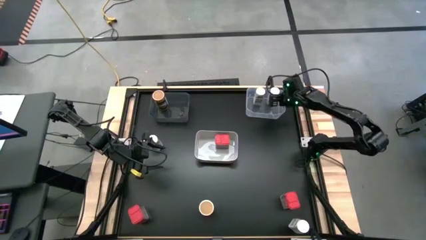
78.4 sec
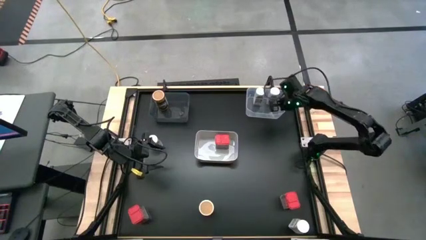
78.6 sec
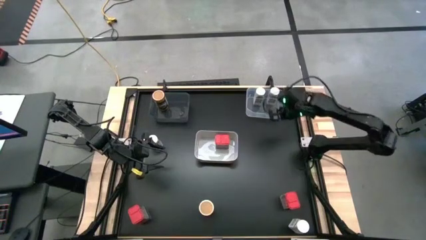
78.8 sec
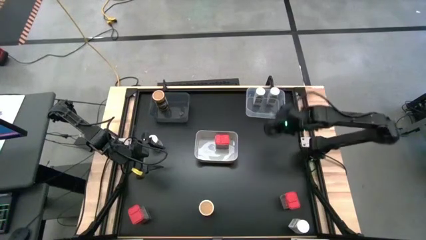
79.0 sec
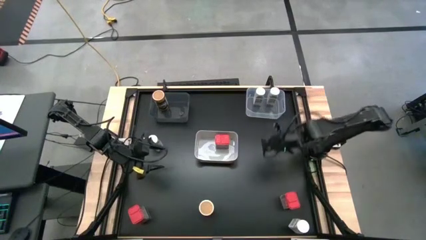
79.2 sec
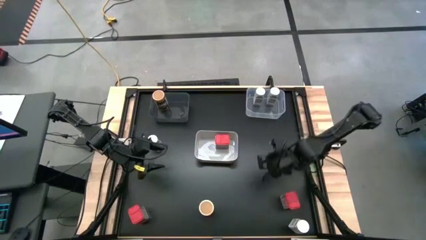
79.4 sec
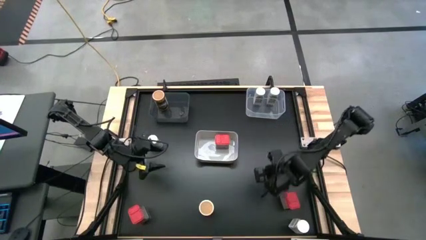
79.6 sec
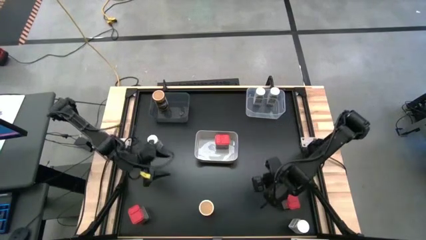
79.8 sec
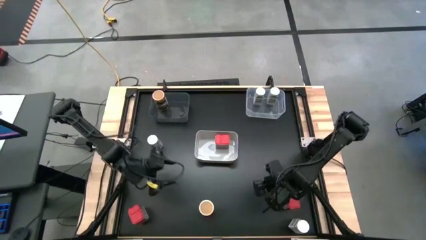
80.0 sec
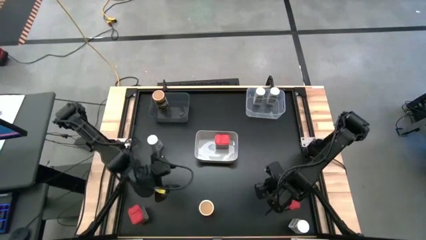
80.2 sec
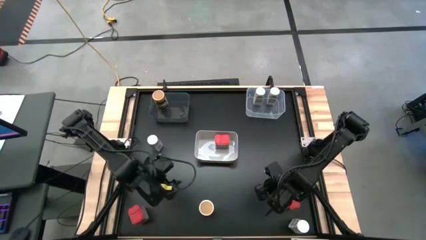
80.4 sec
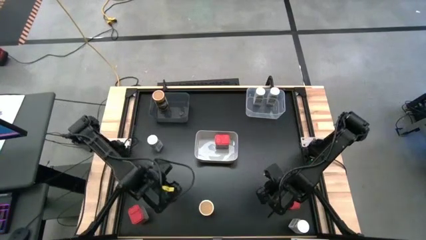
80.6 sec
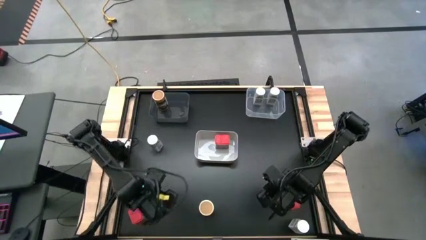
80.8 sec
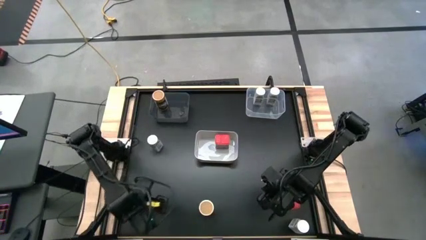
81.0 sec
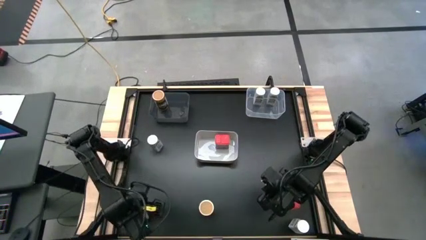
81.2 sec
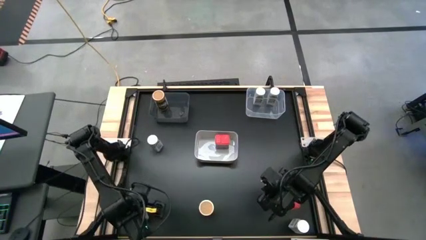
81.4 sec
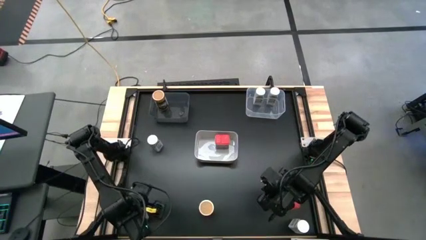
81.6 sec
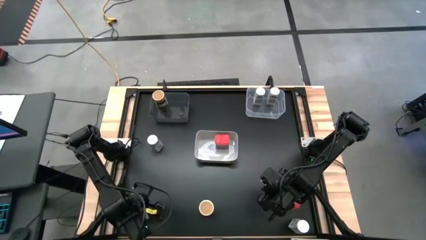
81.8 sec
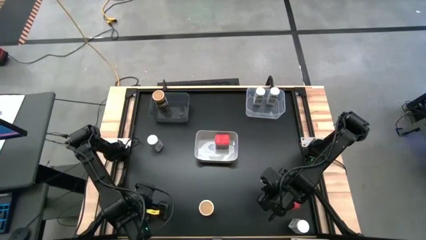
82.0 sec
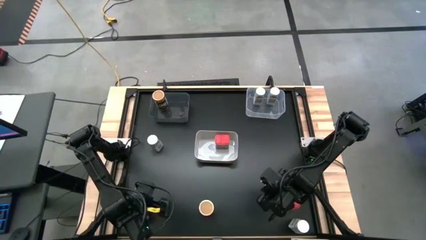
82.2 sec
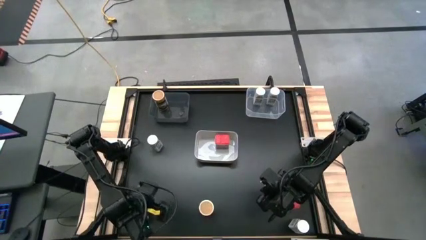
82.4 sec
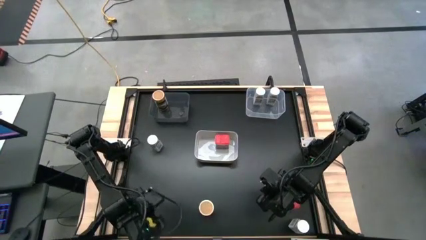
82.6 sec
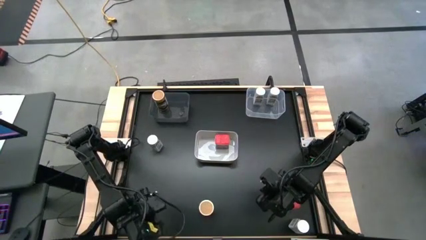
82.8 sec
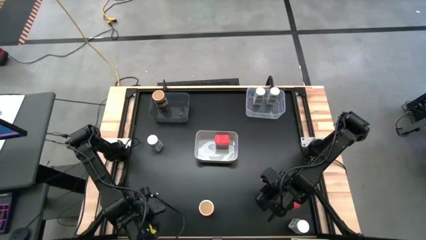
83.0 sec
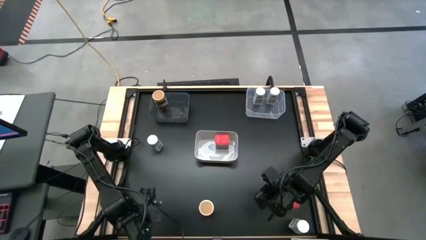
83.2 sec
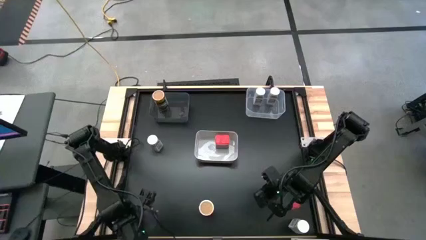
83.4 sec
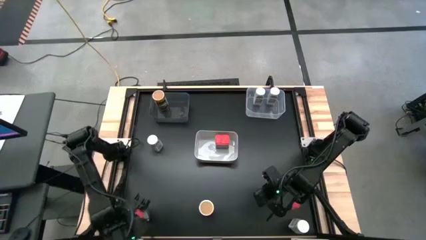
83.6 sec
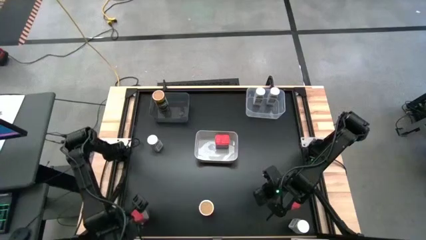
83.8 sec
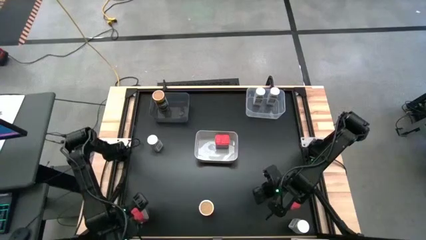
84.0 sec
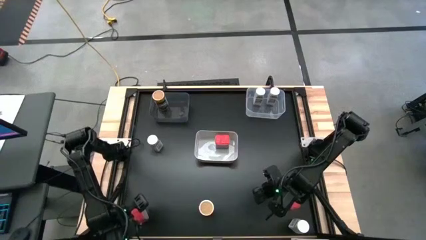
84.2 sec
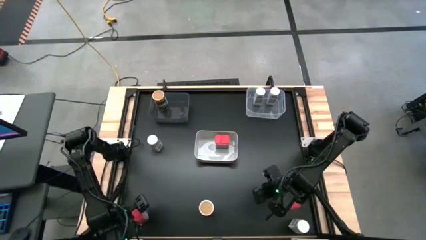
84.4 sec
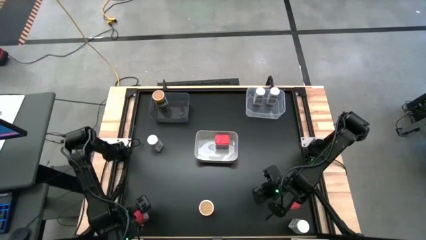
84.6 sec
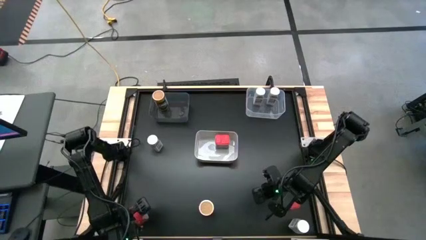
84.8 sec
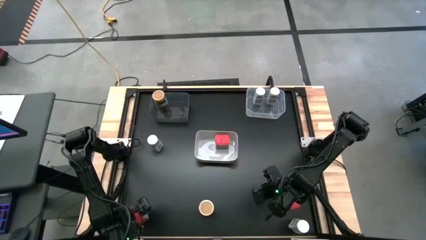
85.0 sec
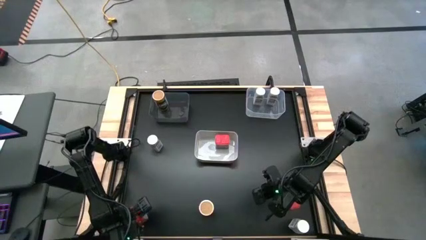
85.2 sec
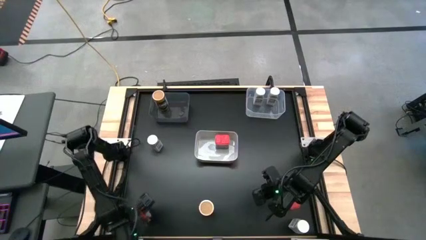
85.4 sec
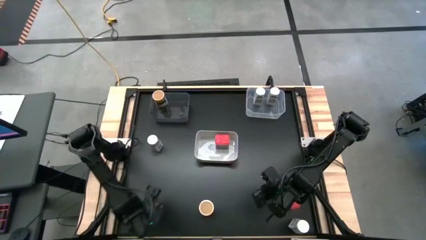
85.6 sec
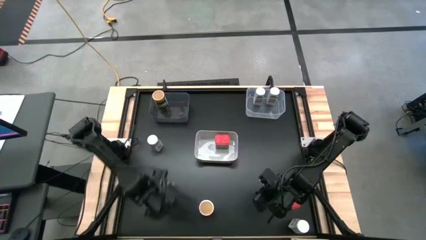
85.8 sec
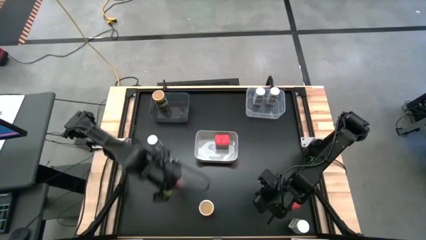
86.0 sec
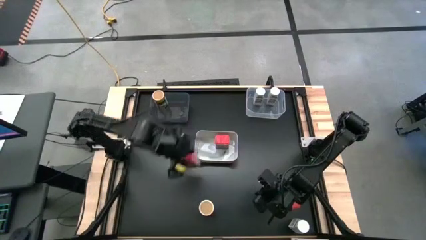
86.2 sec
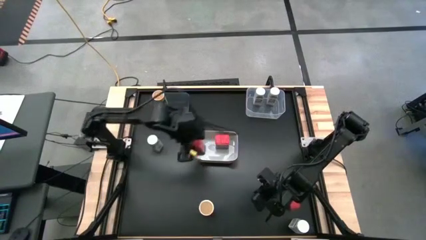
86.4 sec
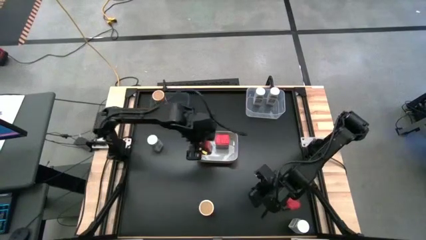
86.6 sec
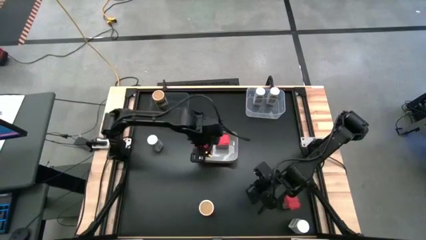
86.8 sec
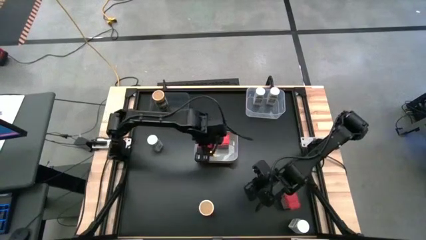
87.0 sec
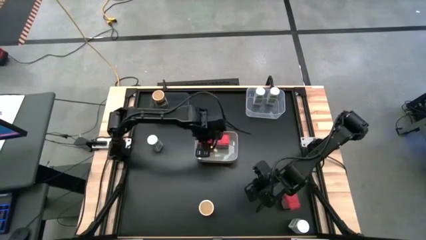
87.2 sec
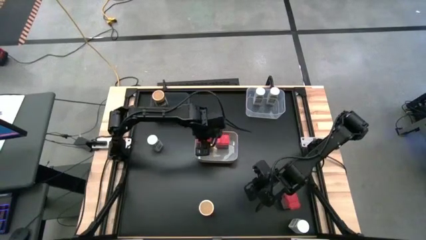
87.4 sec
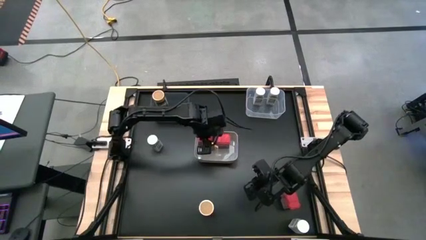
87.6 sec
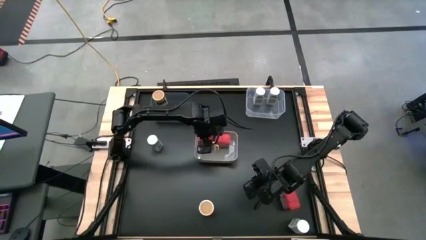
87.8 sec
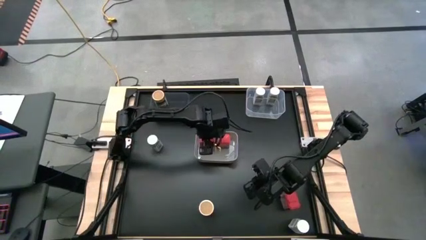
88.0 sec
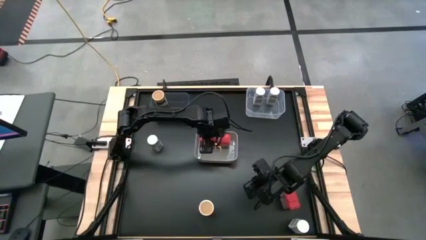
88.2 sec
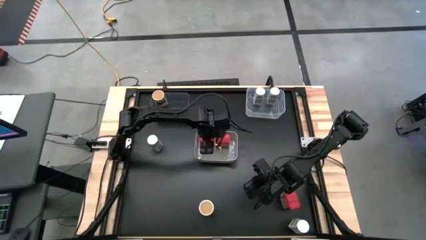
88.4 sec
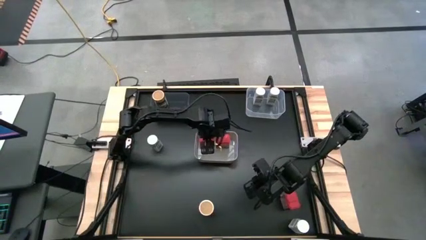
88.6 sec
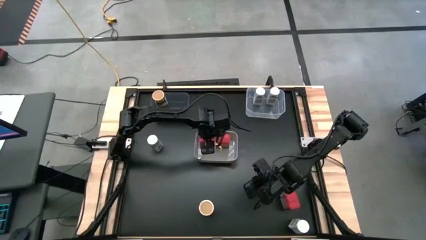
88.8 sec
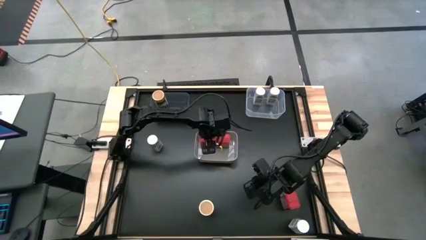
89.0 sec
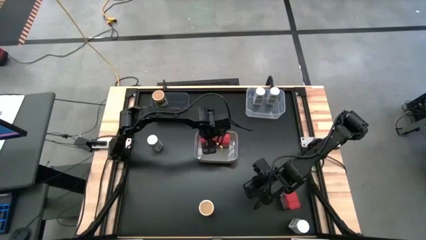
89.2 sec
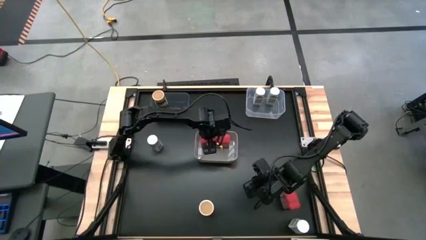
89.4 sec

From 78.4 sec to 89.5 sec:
Task: Sort spices by type
Put the red seasoning can into the gray bin

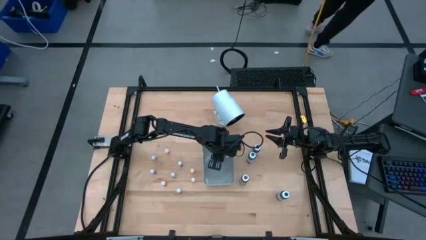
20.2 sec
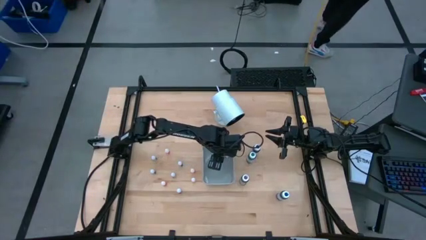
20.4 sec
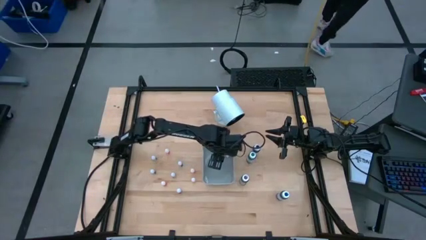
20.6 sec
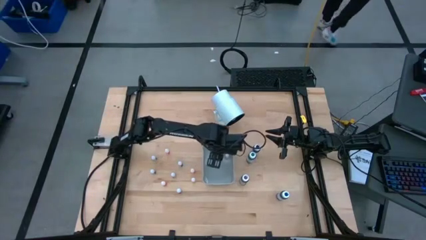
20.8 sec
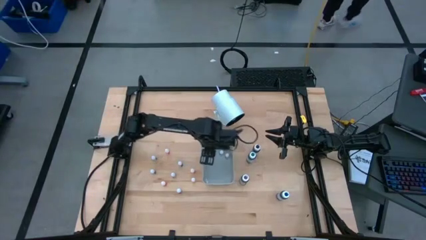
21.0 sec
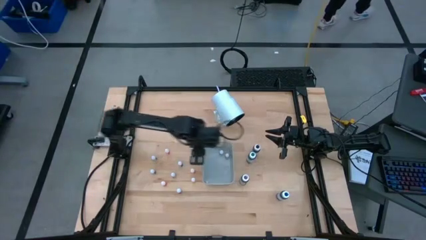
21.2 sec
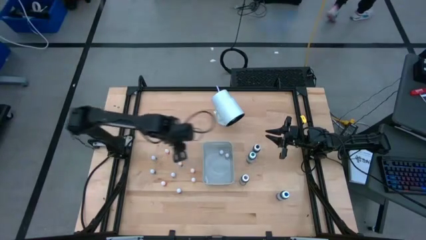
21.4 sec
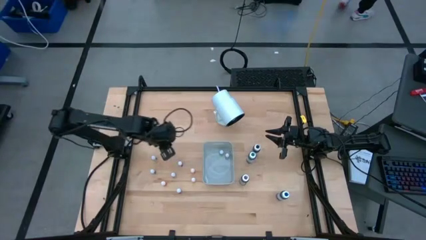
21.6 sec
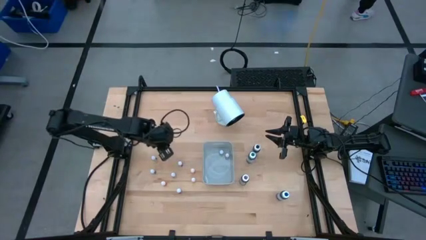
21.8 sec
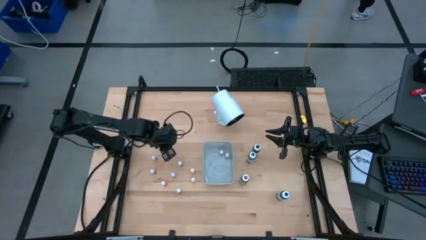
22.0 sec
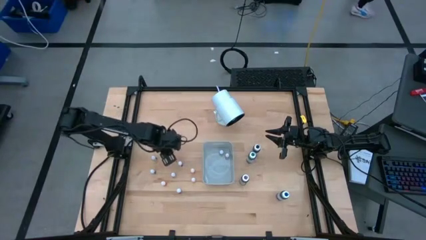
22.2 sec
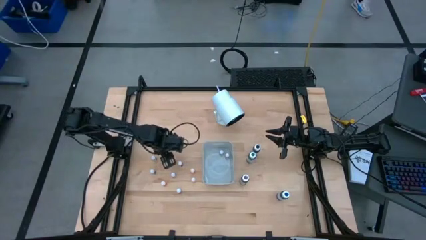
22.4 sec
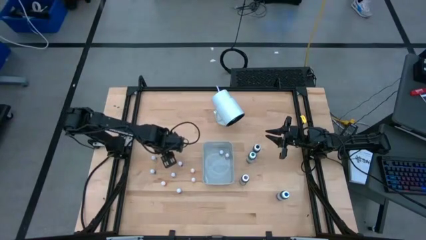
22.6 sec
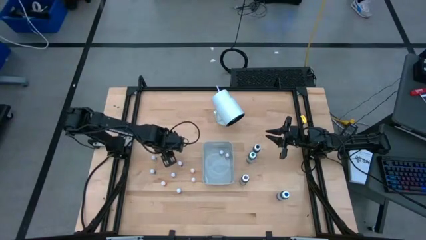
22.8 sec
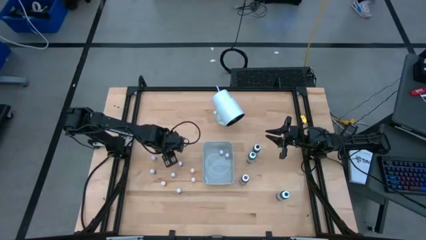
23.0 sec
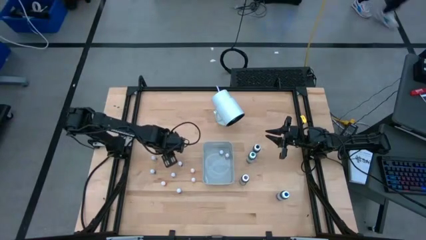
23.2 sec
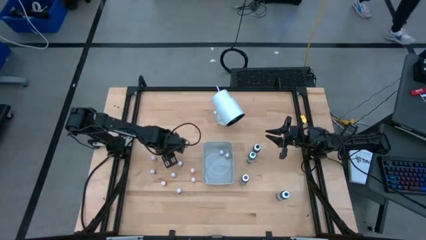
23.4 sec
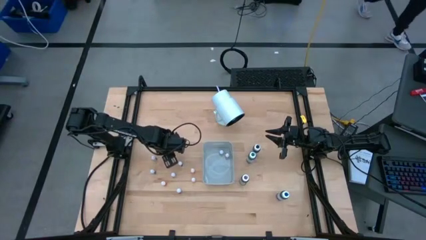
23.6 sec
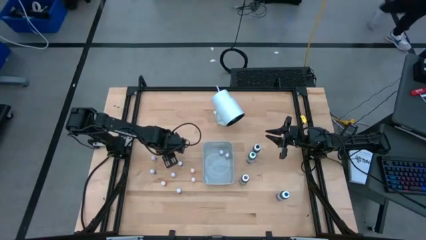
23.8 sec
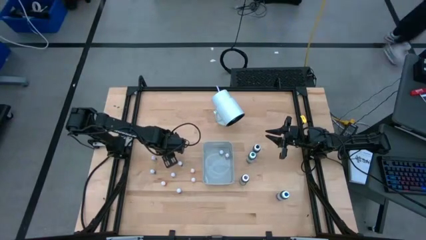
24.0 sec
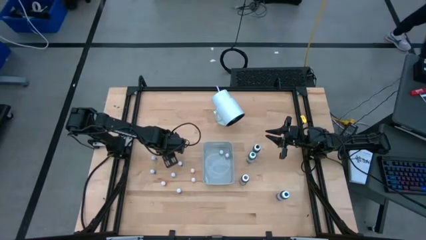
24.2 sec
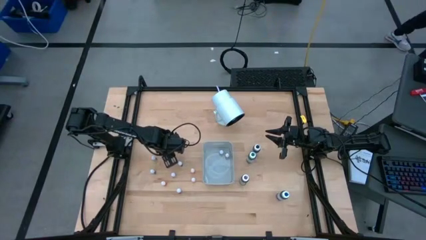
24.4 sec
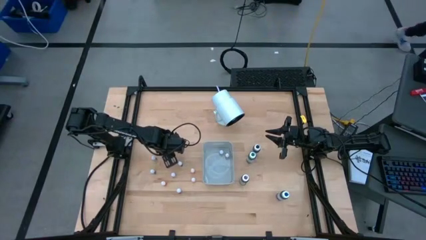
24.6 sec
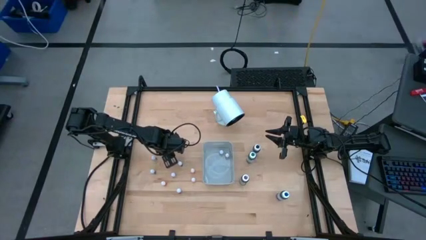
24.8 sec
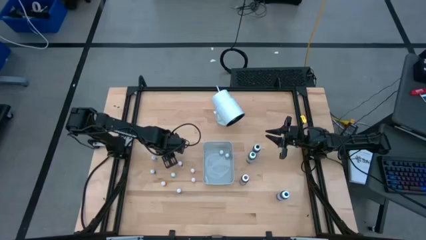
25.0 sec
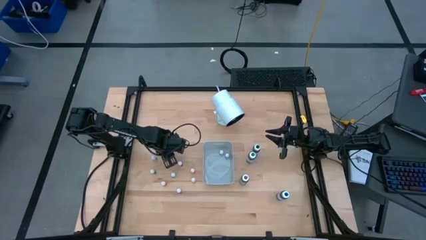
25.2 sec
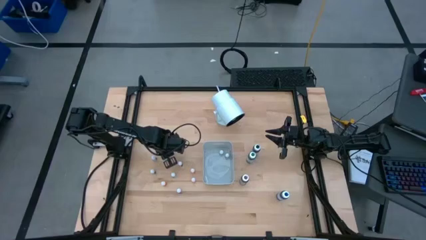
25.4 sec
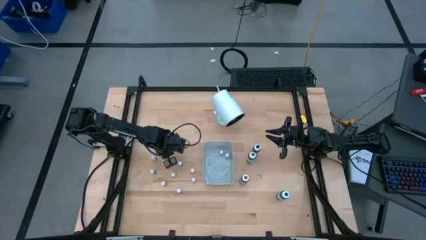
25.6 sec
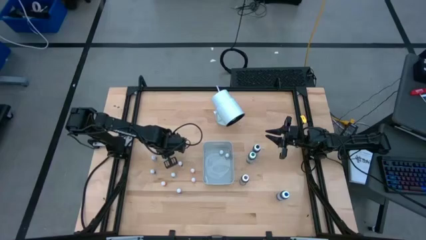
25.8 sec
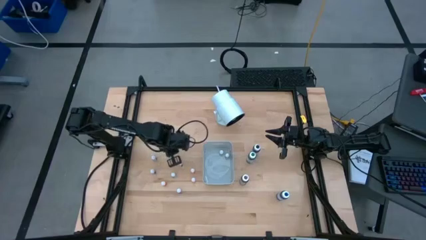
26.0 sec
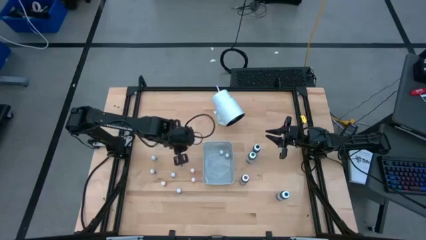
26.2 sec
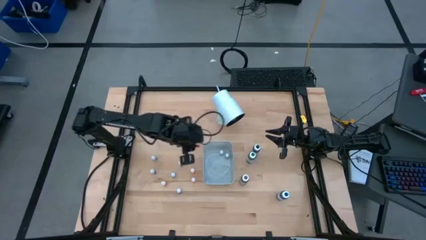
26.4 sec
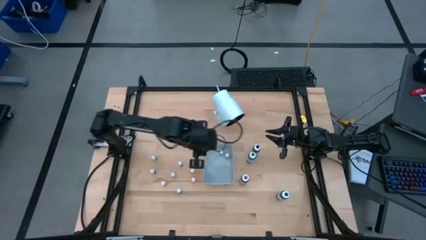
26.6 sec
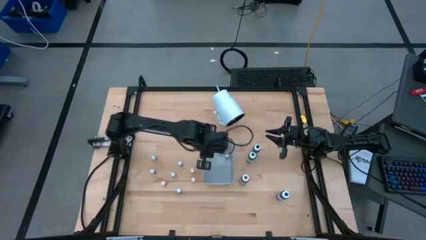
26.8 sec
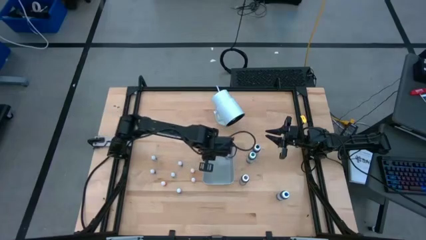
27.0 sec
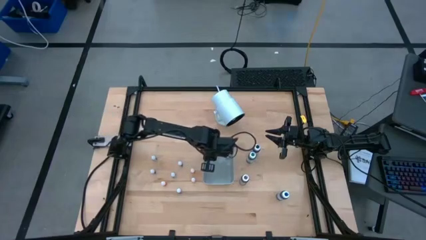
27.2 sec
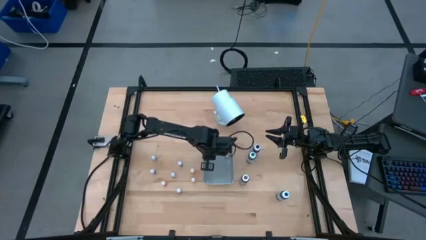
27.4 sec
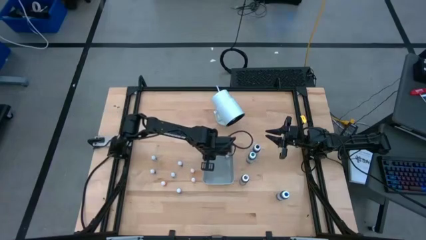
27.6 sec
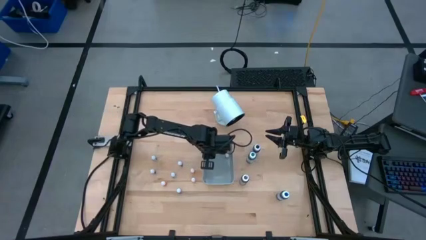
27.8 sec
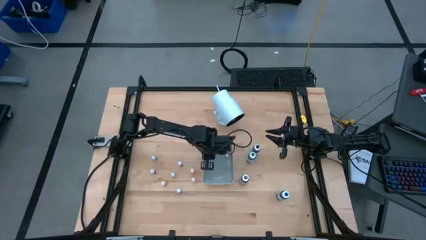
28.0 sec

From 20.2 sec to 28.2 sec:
Task: Pick & Place food coloring
Put the small orange food coloring bottle into the gray bin
